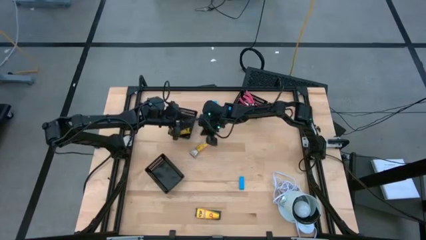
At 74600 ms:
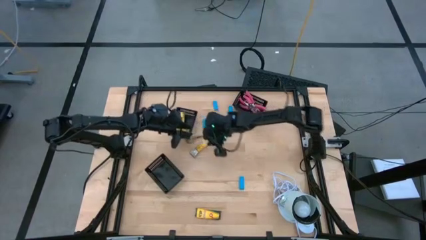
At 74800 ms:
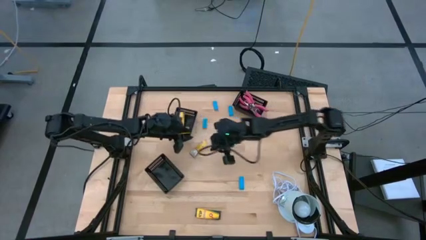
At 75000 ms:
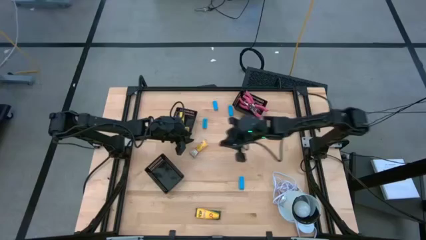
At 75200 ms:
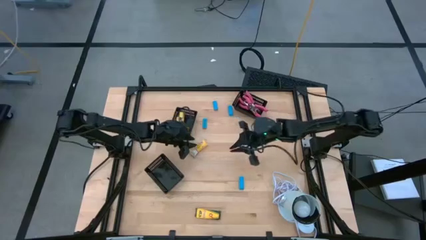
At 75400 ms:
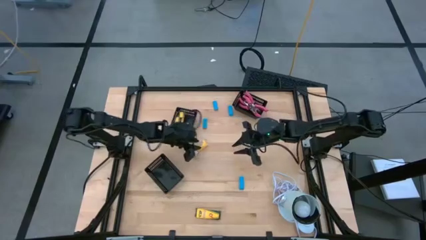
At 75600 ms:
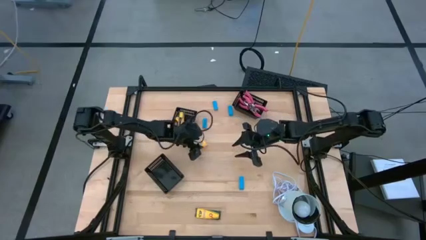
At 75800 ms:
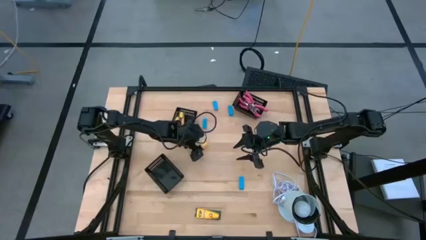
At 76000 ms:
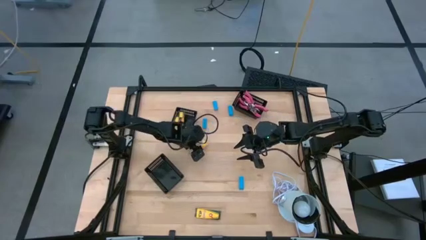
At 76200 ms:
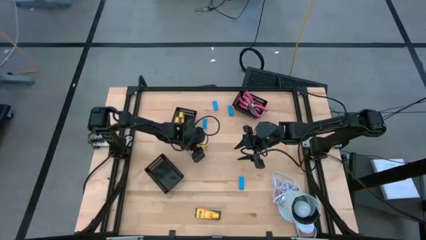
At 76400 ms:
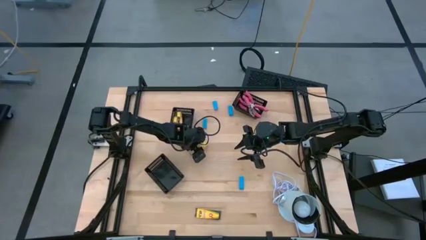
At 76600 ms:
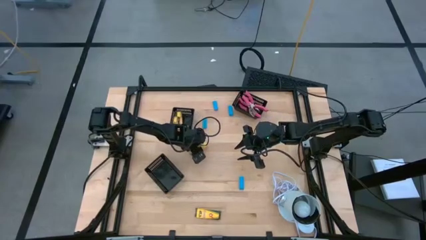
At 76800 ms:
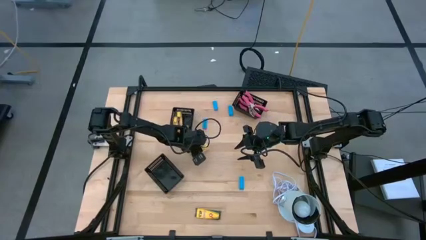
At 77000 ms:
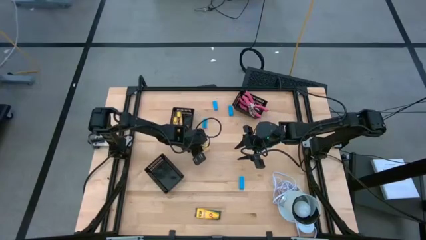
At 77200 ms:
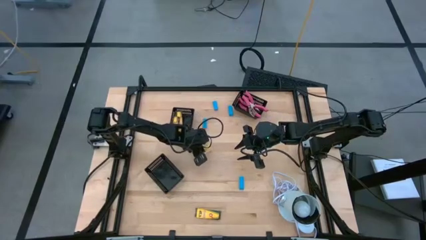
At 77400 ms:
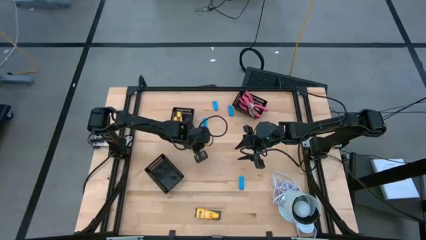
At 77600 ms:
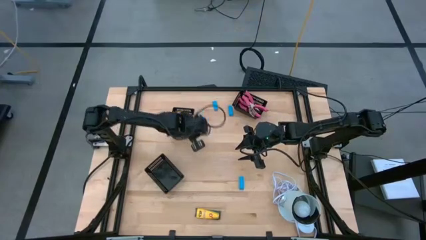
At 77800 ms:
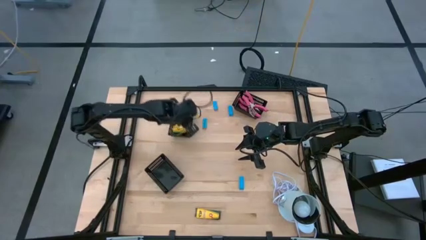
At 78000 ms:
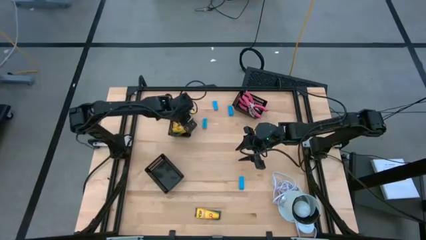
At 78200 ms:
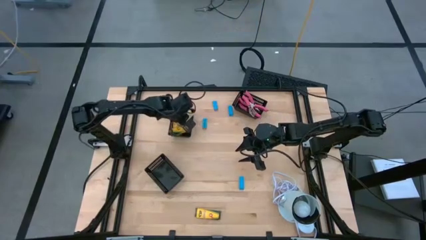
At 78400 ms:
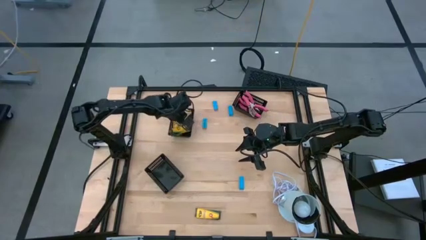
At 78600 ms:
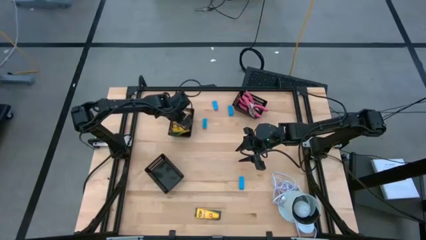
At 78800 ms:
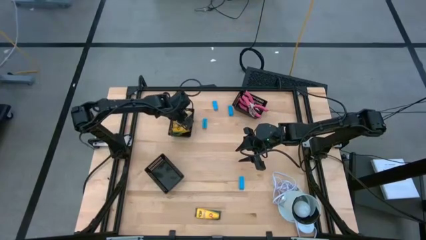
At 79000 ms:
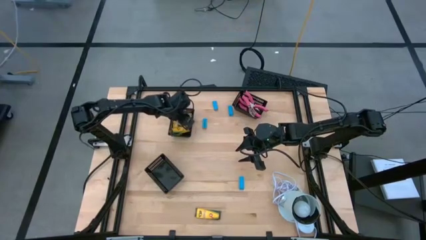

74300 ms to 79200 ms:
Task: Pick & Place School Supplies
Put the yellow crayon box into the middle black bin

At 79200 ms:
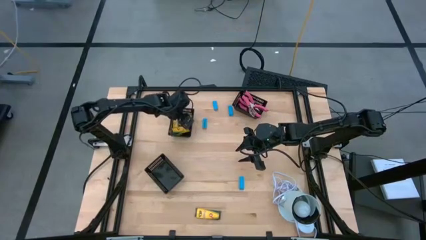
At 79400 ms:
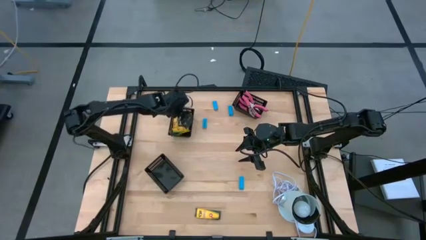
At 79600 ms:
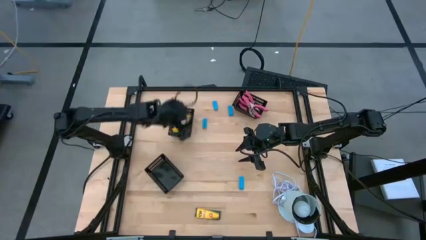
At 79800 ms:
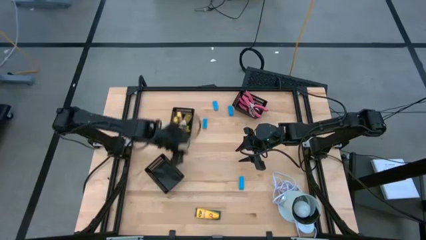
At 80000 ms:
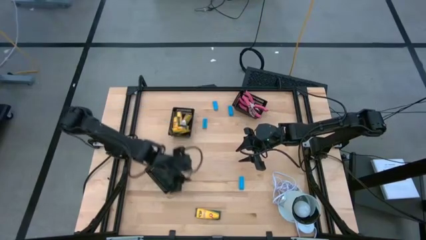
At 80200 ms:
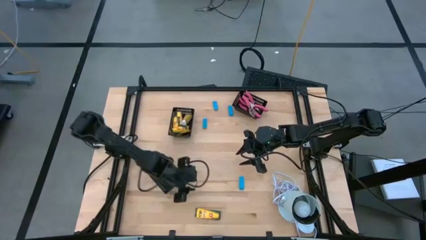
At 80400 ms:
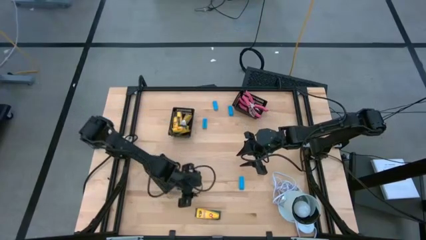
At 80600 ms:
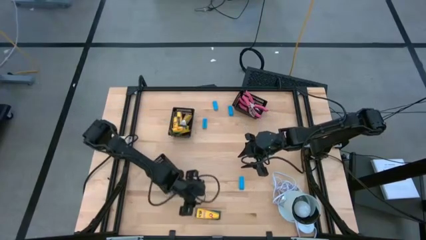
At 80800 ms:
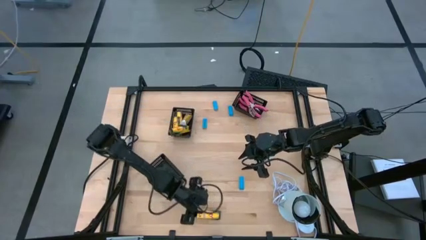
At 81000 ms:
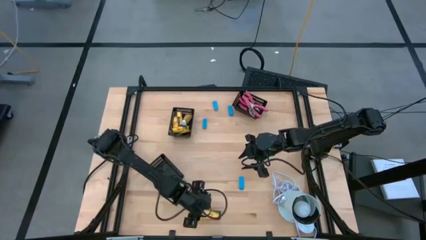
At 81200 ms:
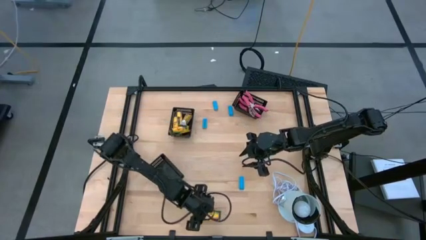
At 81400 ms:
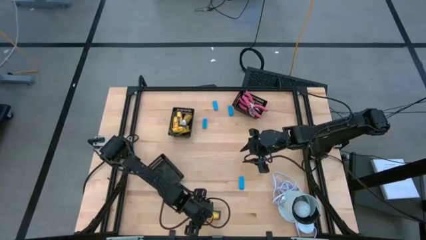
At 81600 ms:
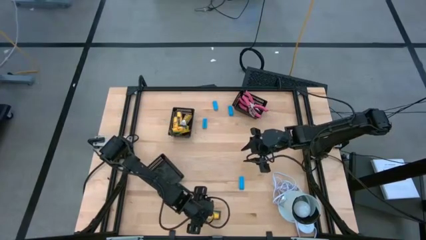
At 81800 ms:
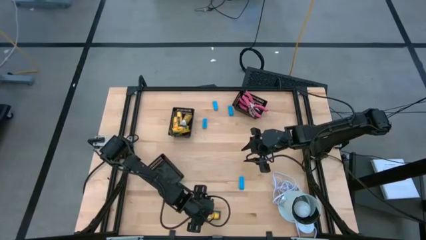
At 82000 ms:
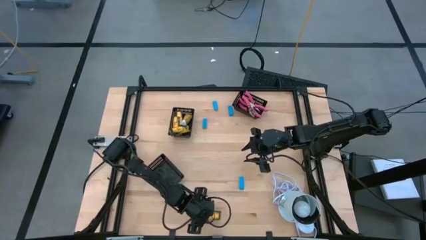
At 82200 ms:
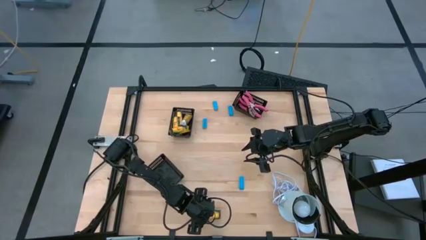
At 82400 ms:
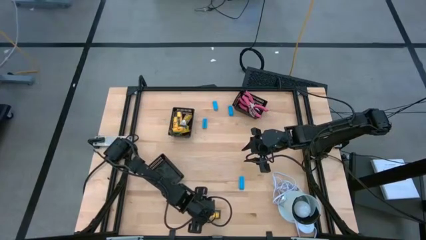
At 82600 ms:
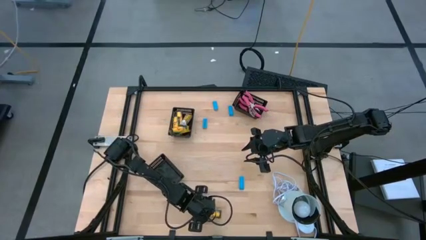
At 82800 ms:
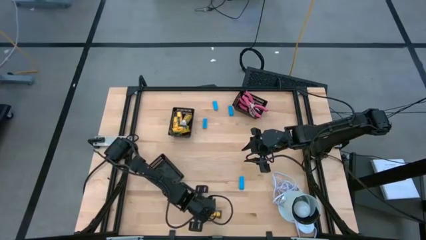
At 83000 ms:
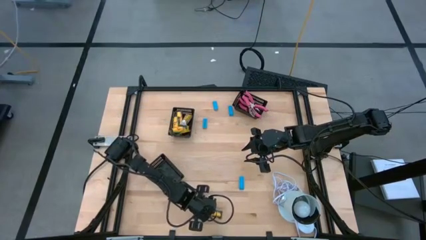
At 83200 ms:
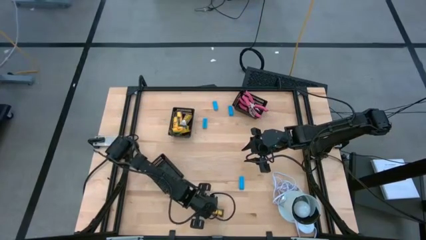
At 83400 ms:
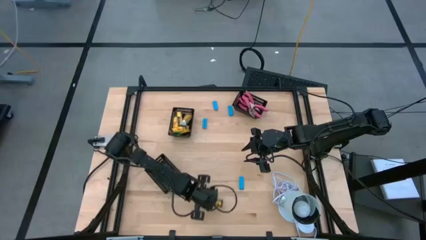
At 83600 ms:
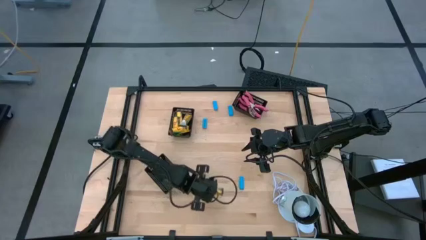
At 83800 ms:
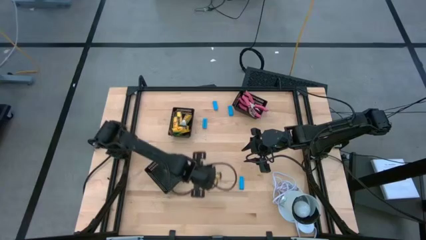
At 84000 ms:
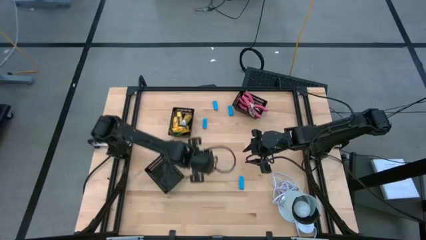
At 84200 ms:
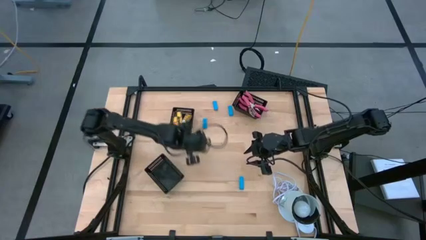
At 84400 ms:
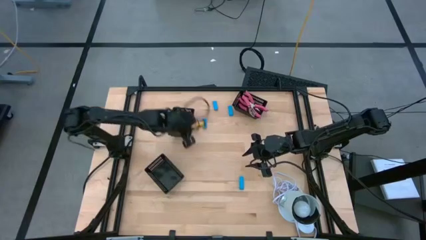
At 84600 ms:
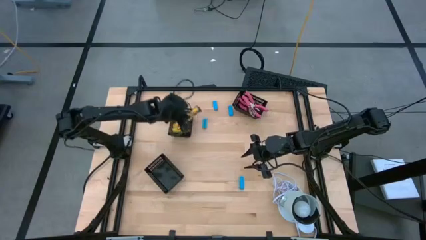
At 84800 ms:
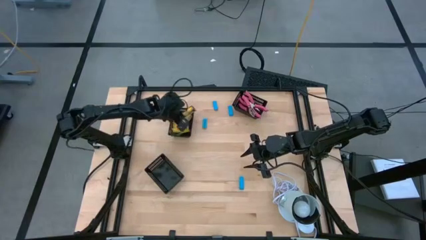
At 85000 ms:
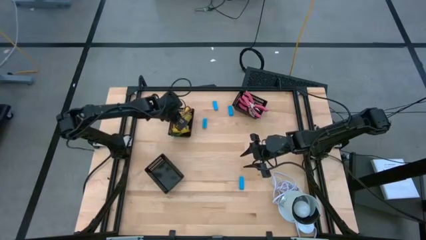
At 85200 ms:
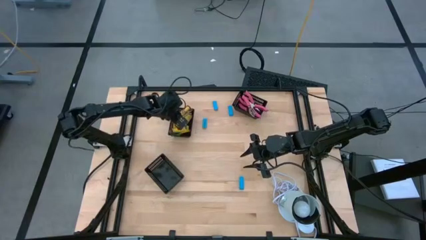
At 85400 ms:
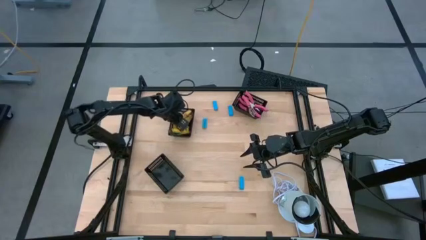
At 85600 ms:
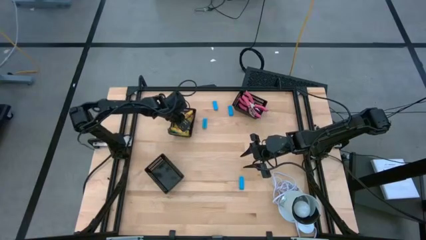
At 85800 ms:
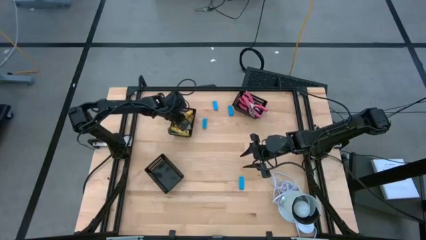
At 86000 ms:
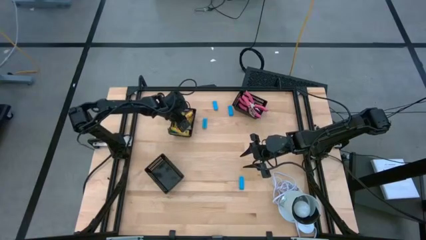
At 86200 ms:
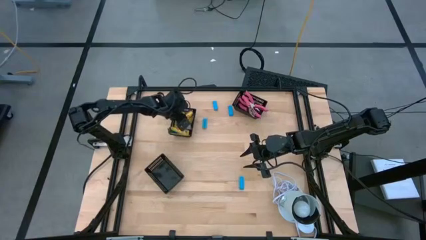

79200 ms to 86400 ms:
Put the yellow crayon box into the middle black bin

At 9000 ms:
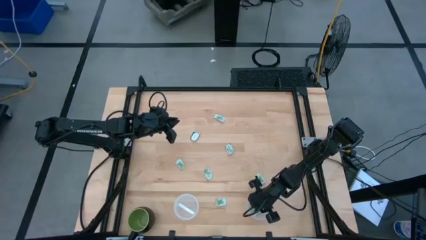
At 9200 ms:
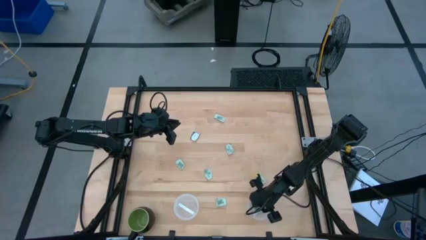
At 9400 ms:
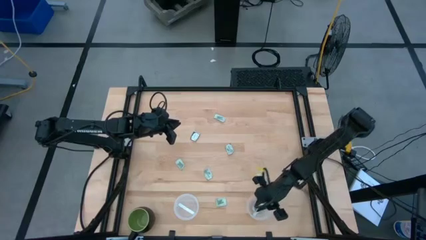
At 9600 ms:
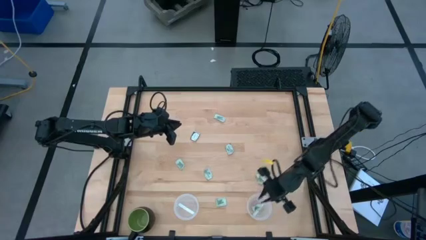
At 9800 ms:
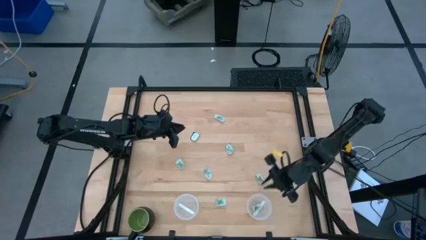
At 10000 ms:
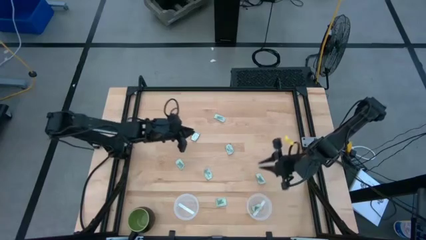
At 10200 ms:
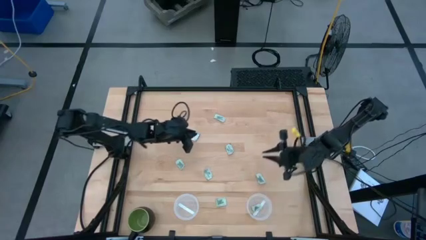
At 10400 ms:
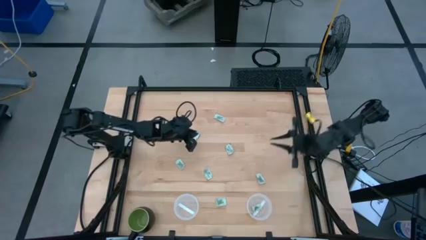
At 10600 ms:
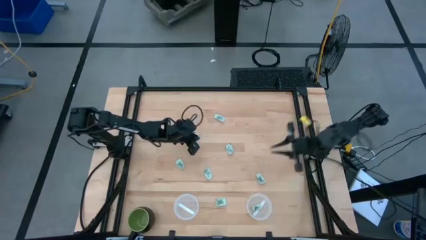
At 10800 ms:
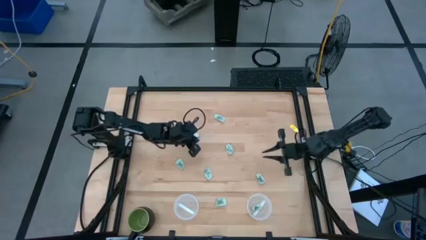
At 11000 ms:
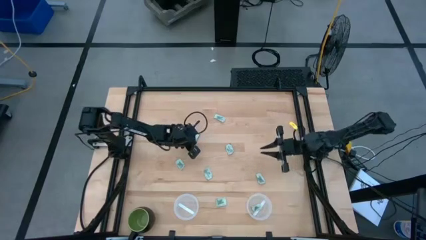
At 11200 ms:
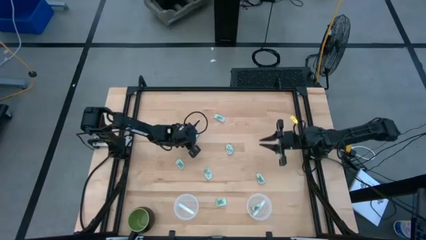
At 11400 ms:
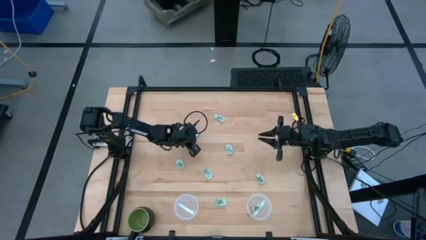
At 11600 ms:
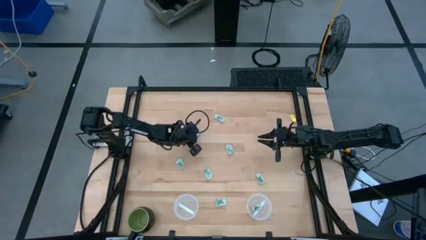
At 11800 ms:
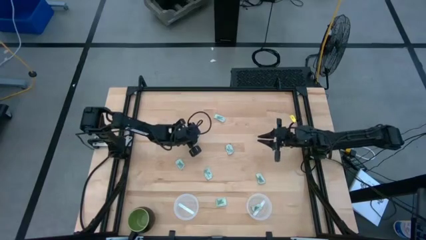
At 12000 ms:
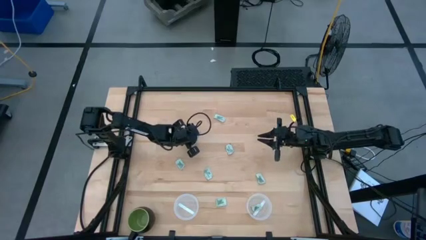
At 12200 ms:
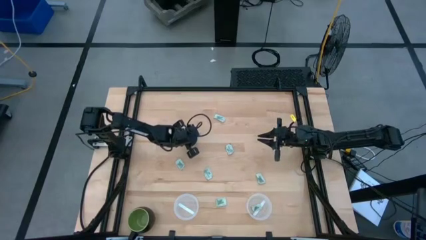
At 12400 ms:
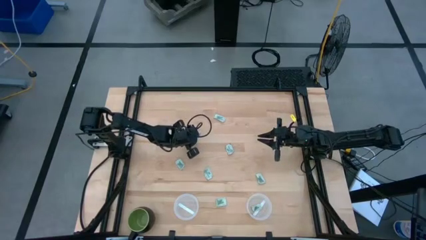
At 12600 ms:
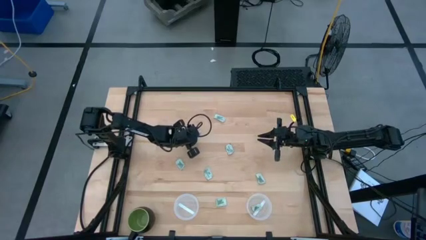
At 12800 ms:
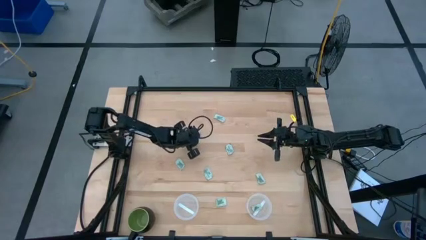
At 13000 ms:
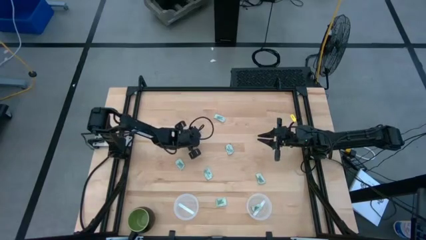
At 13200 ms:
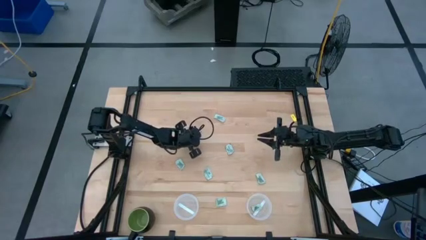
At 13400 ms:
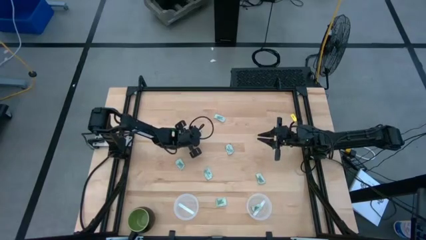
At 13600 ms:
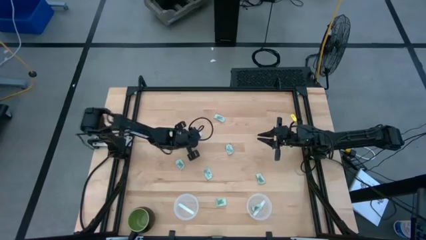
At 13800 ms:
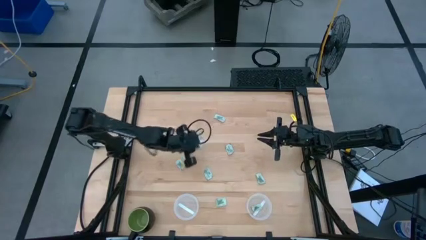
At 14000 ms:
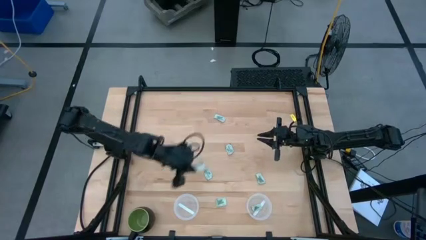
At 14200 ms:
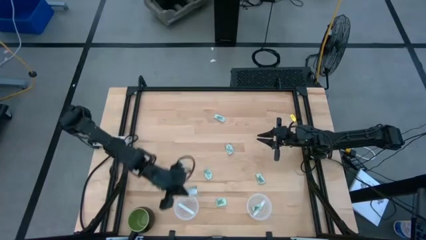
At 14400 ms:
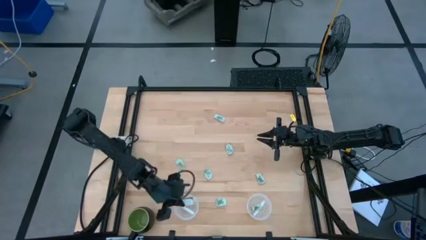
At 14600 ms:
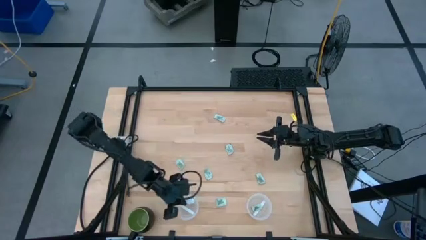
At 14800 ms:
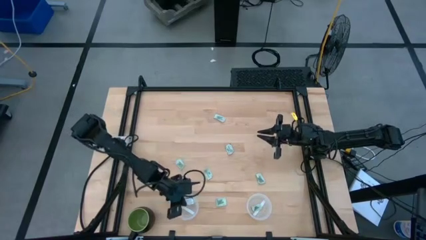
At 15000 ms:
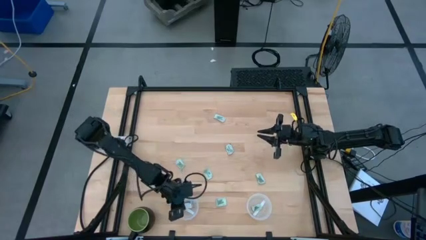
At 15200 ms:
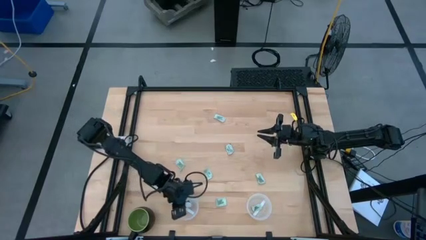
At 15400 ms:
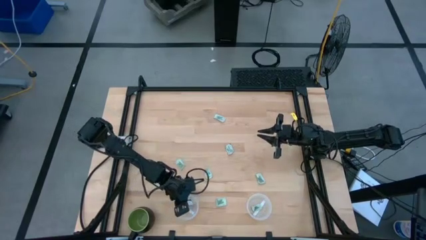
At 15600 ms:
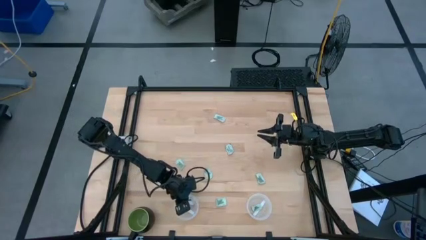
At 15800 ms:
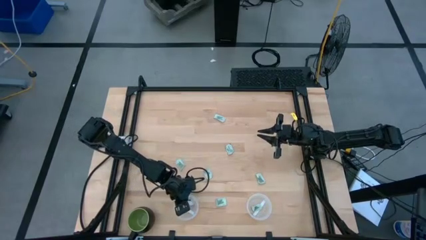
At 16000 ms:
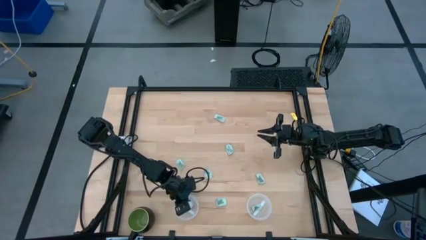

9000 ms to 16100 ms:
Task: Pick and place Stevia / Truvia into bins
Put the truvia packet into the left transparent container
